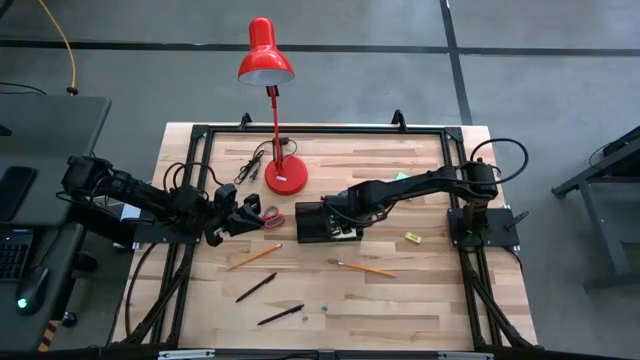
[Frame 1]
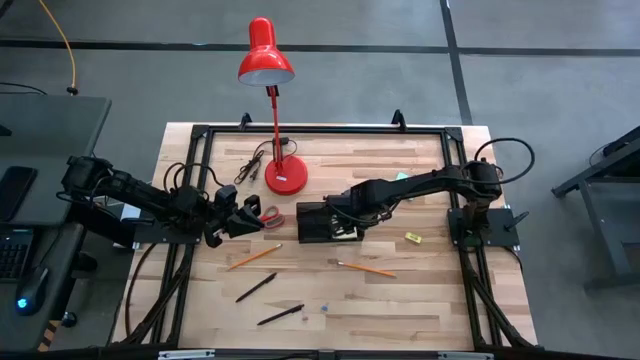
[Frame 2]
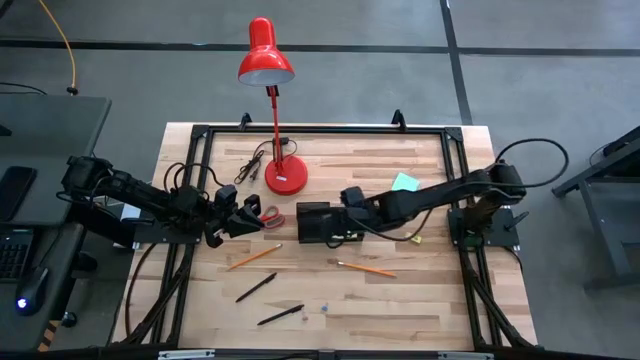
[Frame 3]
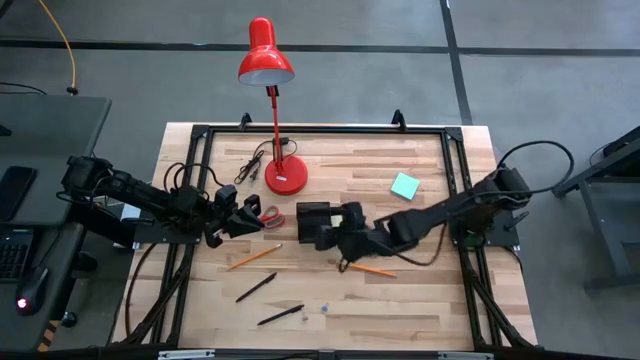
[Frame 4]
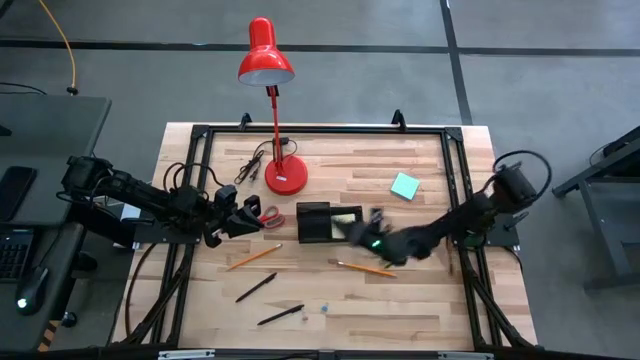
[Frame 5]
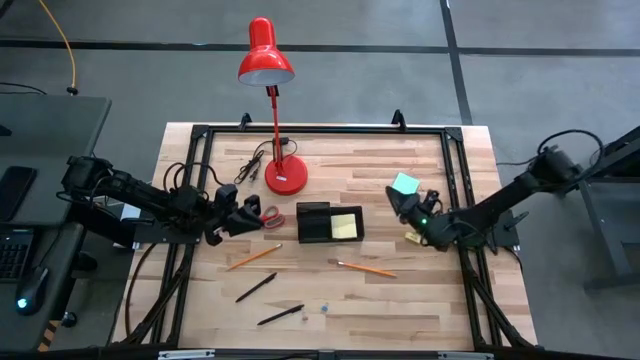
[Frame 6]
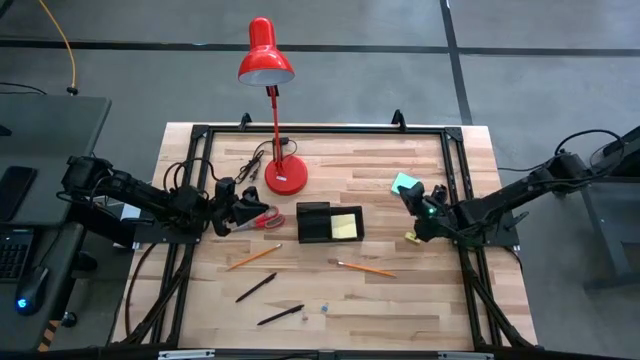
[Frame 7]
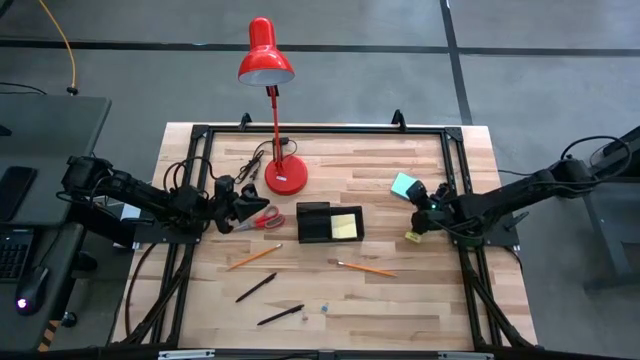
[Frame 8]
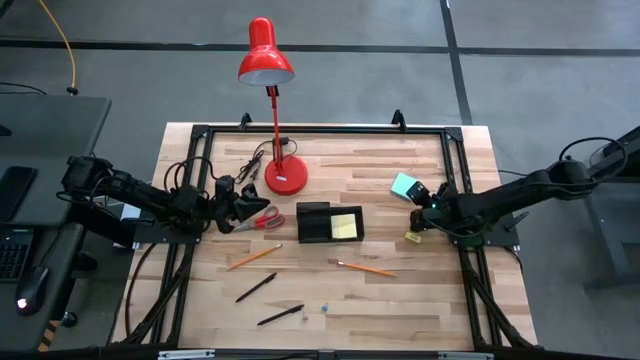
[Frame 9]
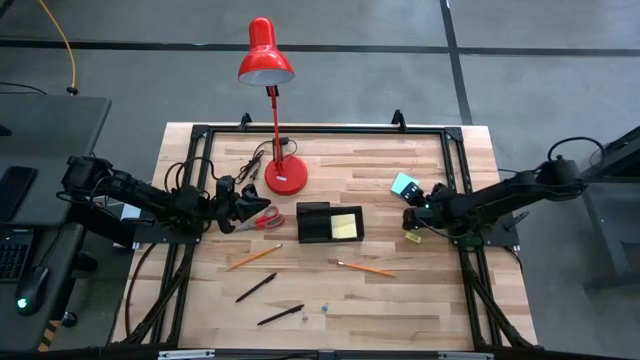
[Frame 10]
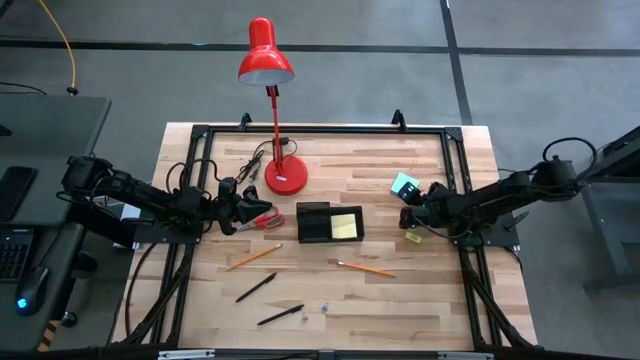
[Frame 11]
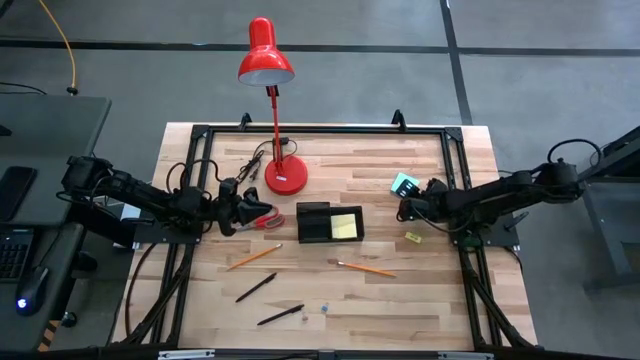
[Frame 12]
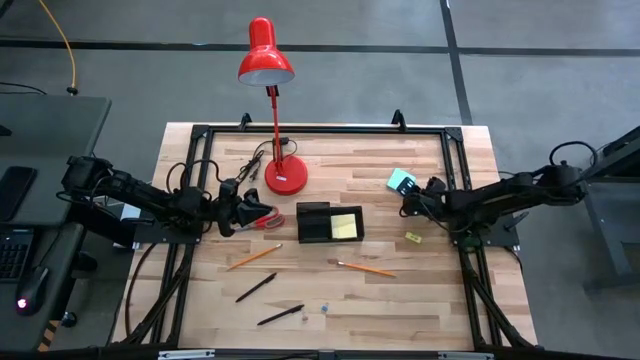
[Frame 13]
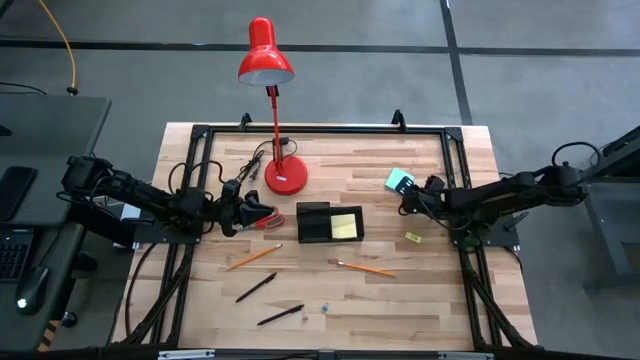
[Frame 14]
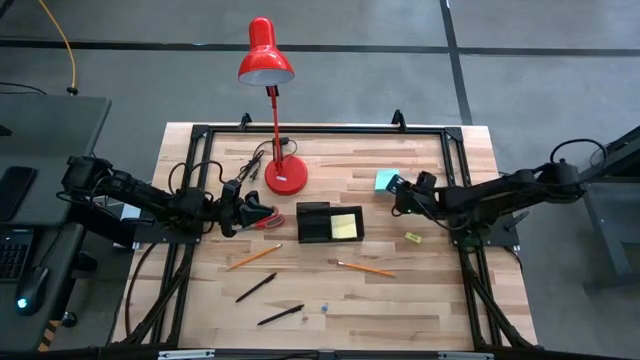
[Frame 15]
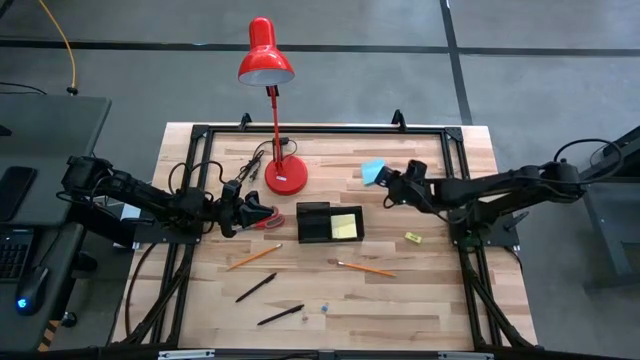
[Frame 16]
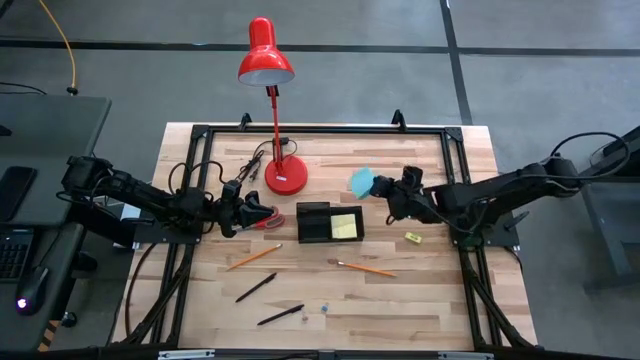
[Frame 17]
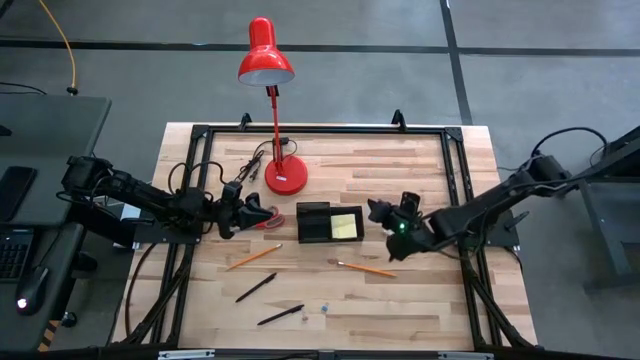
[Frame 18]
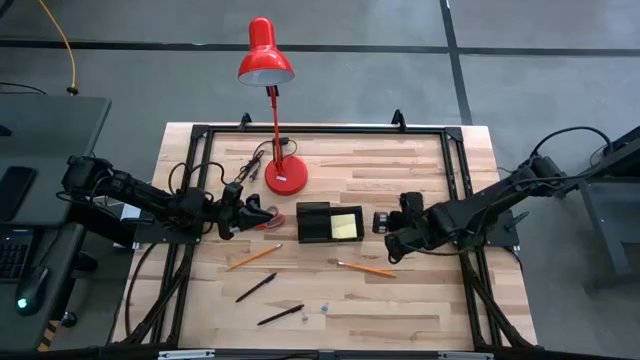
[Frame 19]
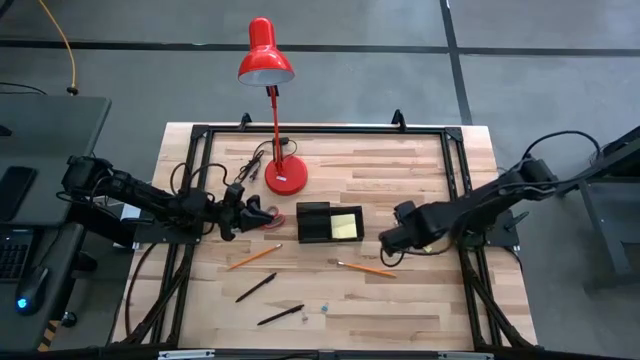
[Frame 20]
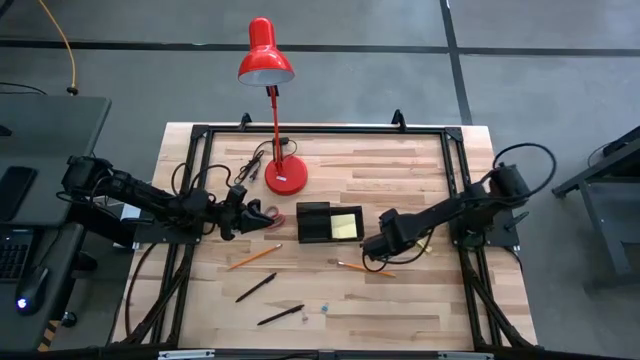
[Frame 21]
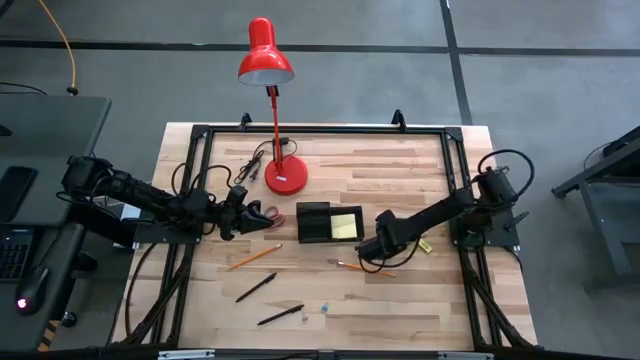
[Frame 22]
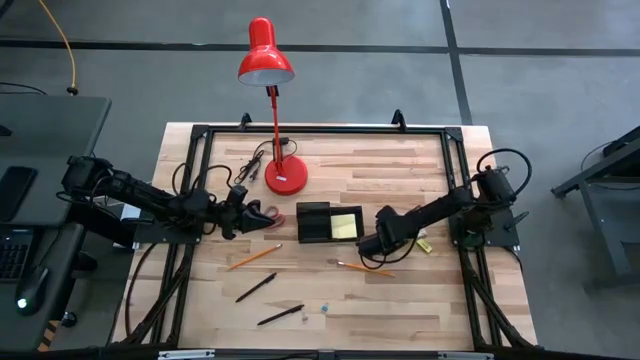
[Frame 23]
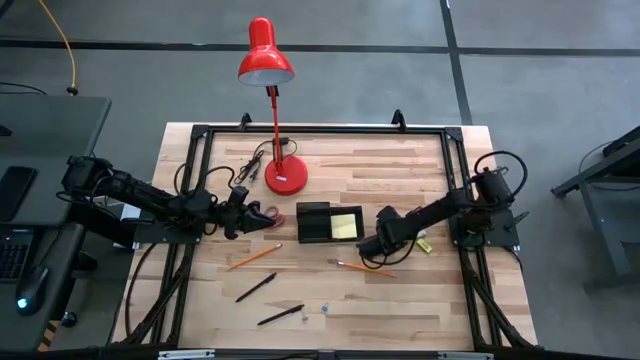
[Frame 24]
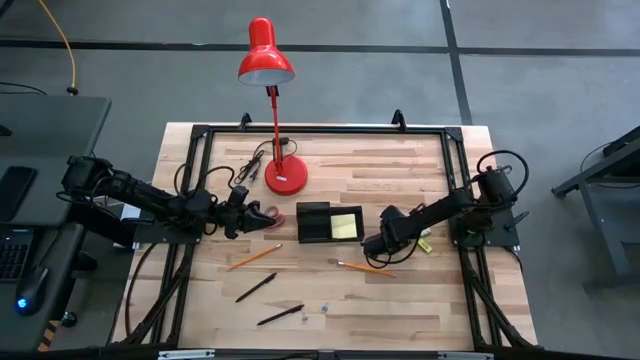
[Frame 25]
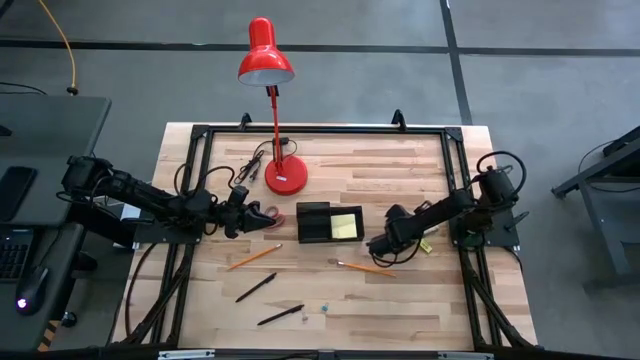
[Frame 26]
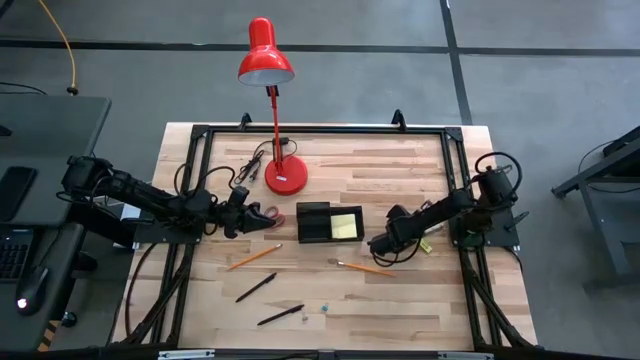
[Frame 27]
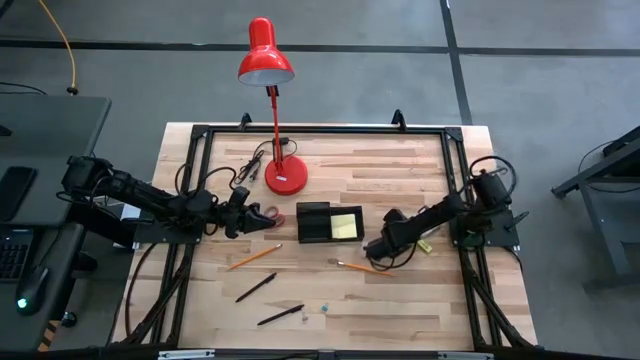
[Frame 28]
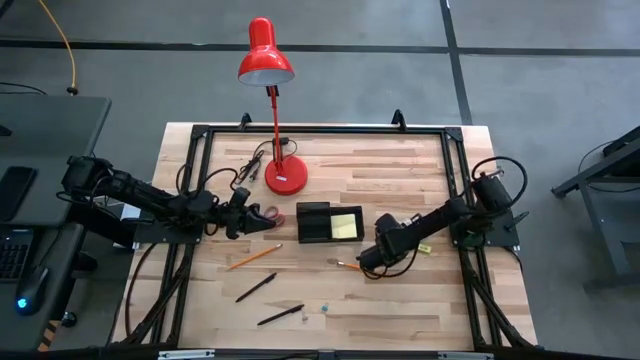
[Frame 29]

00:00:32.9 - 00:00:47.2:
Task: Pick and place office supplies into organizer
Put the blue sticky notes into the black desk organizer
